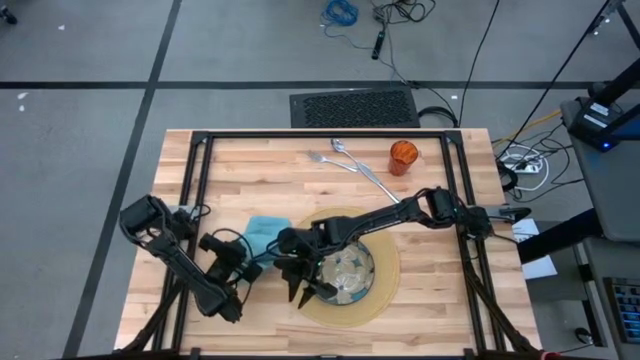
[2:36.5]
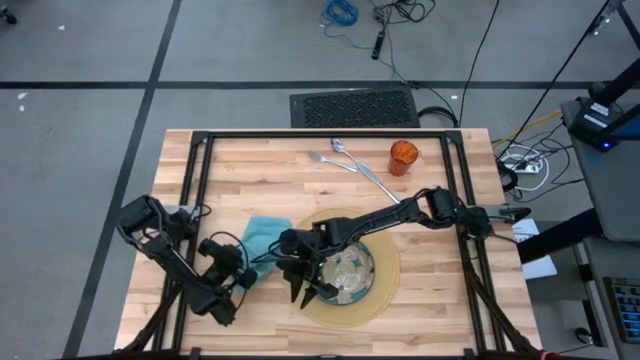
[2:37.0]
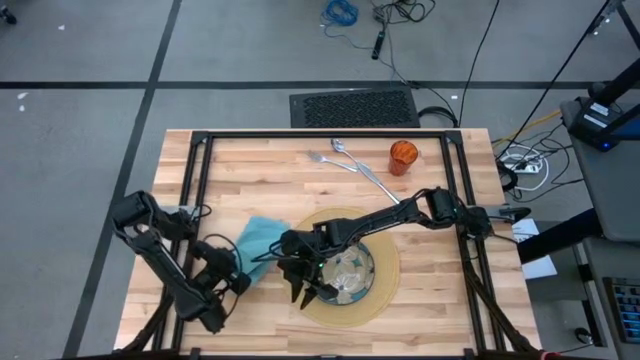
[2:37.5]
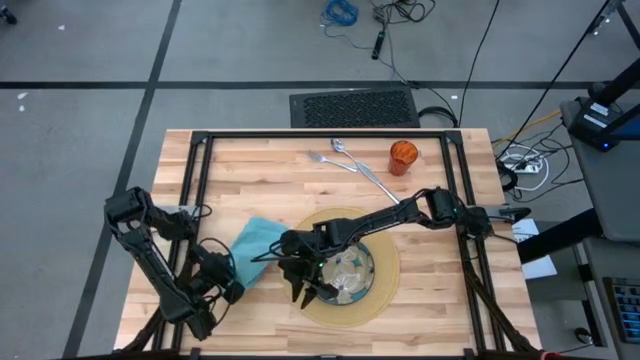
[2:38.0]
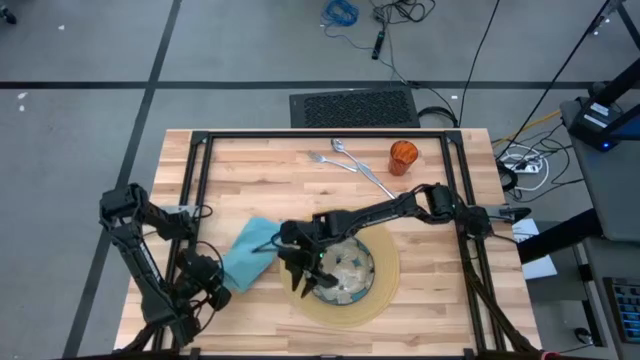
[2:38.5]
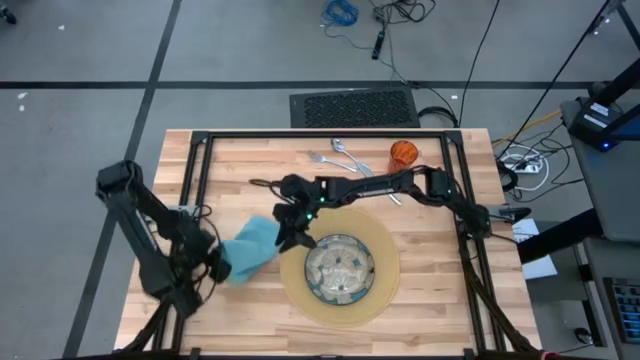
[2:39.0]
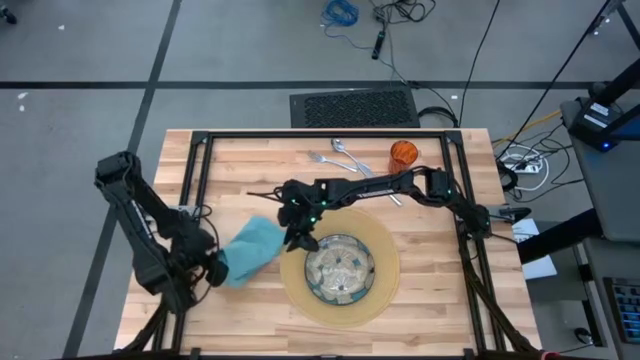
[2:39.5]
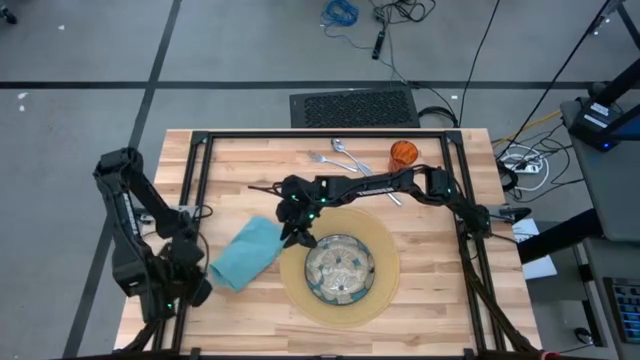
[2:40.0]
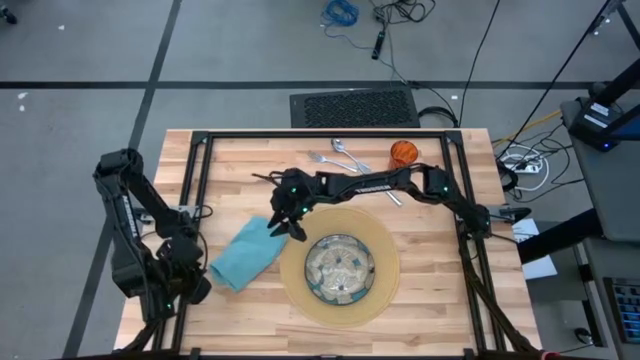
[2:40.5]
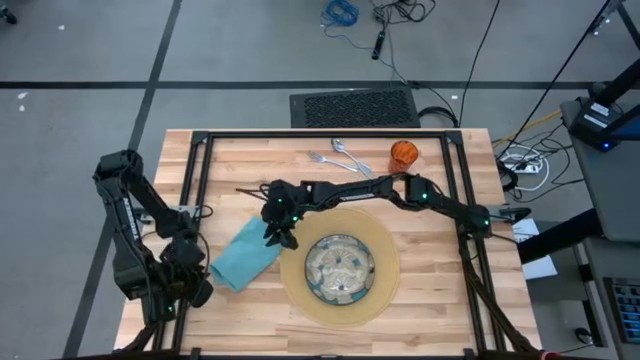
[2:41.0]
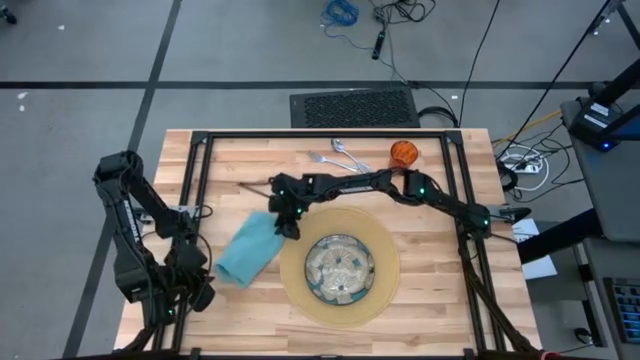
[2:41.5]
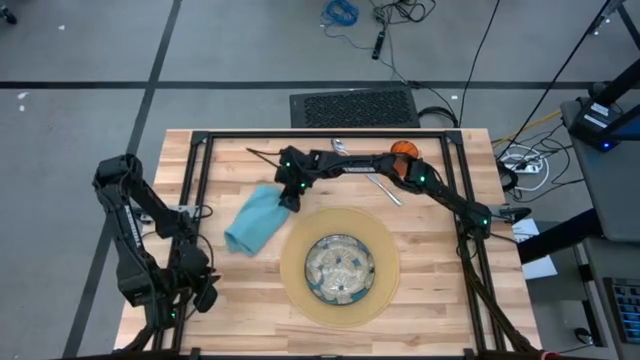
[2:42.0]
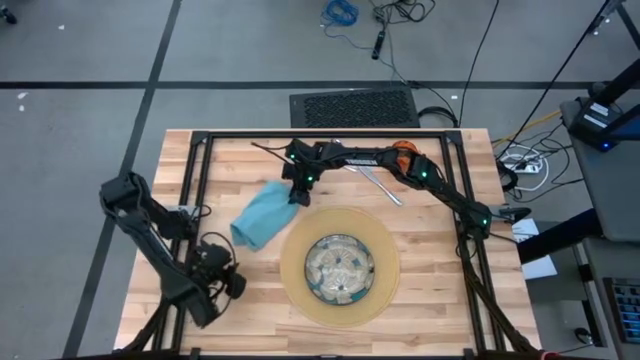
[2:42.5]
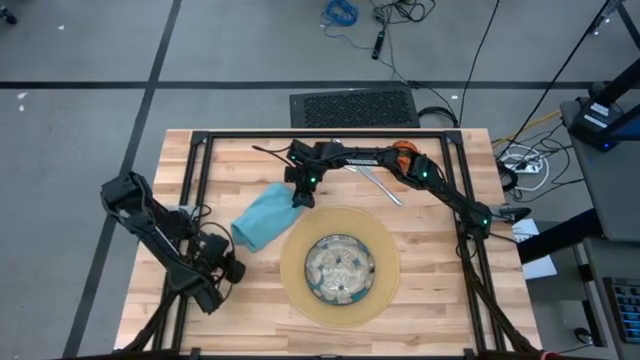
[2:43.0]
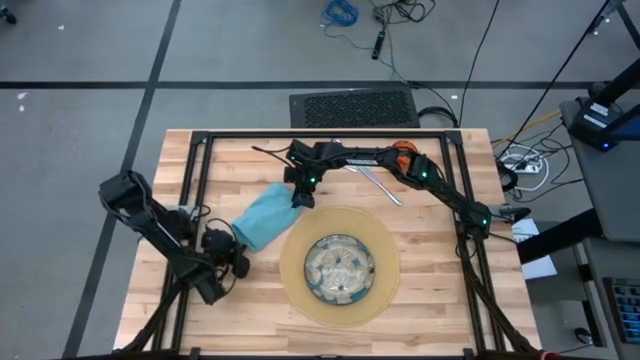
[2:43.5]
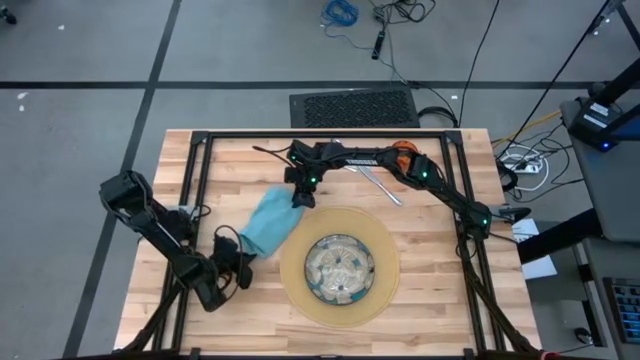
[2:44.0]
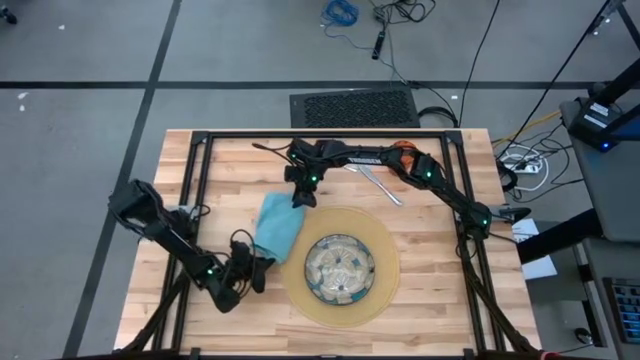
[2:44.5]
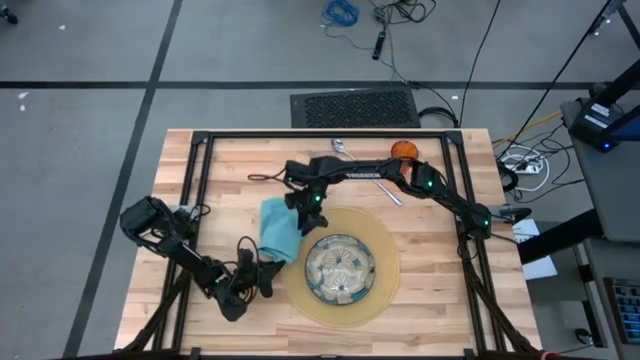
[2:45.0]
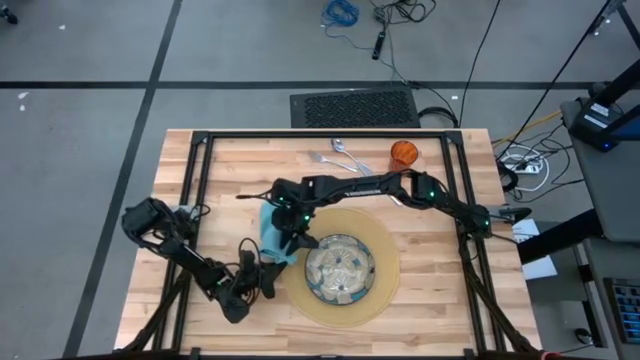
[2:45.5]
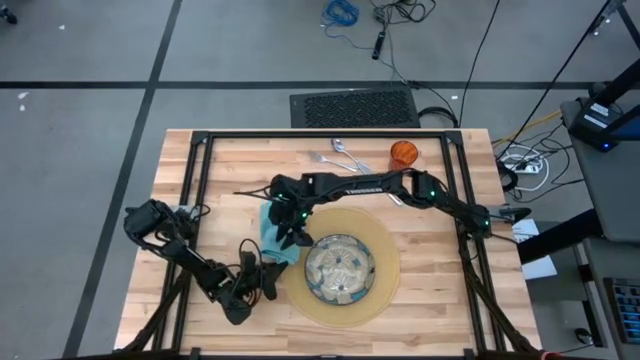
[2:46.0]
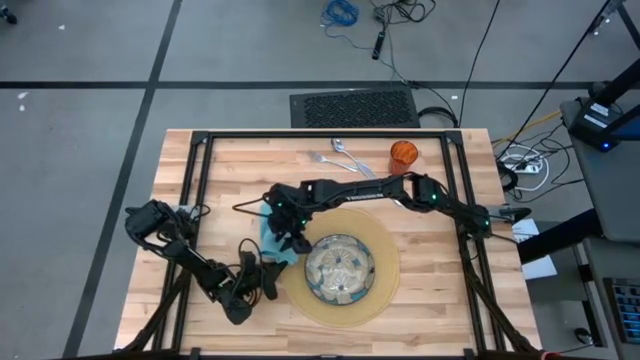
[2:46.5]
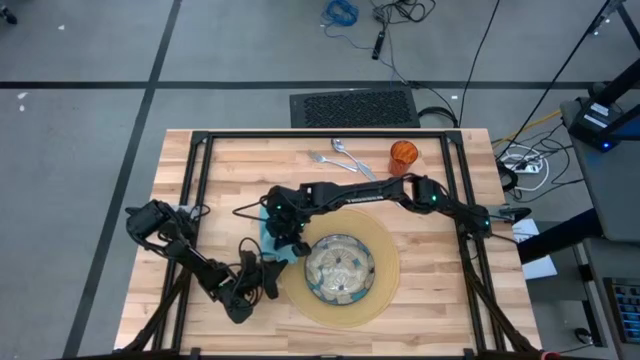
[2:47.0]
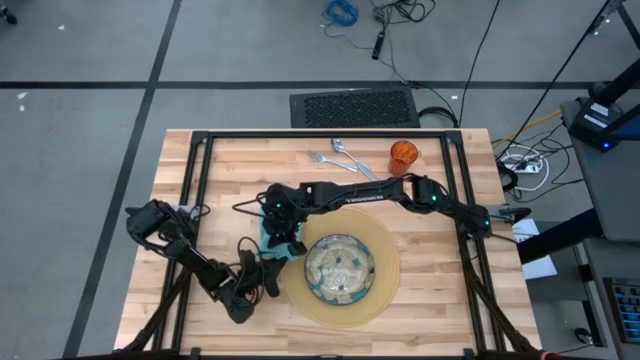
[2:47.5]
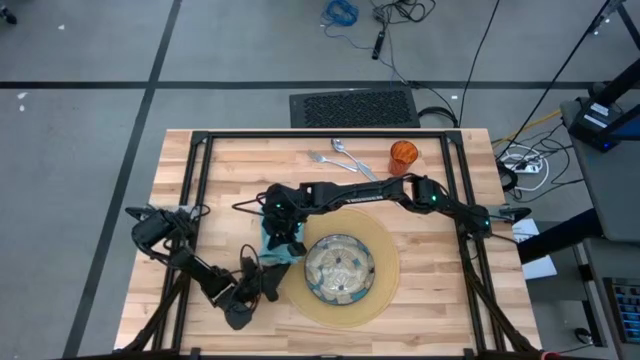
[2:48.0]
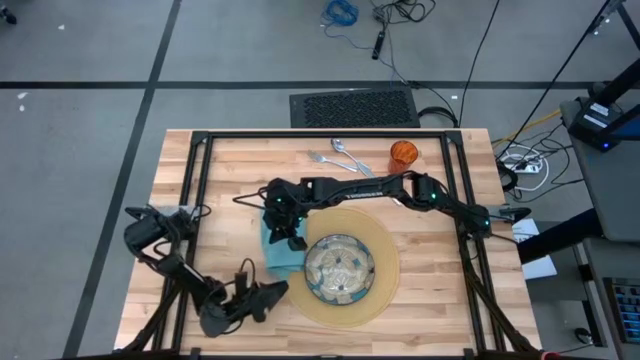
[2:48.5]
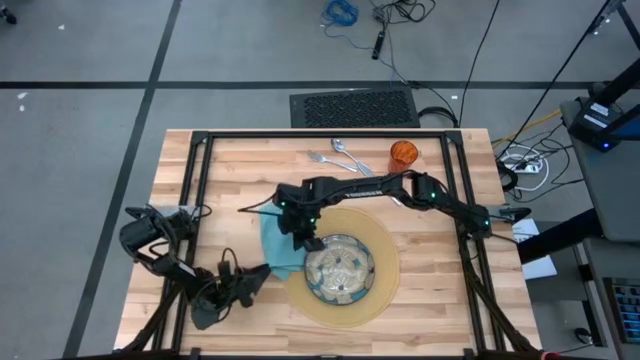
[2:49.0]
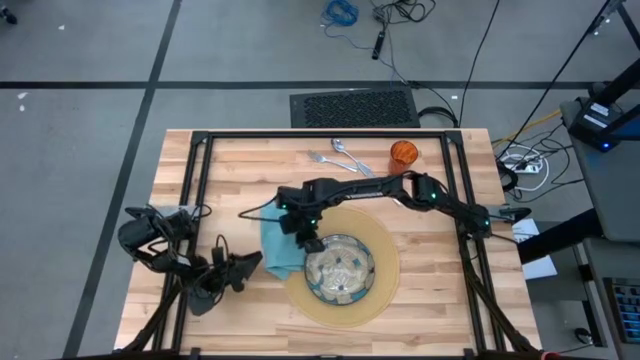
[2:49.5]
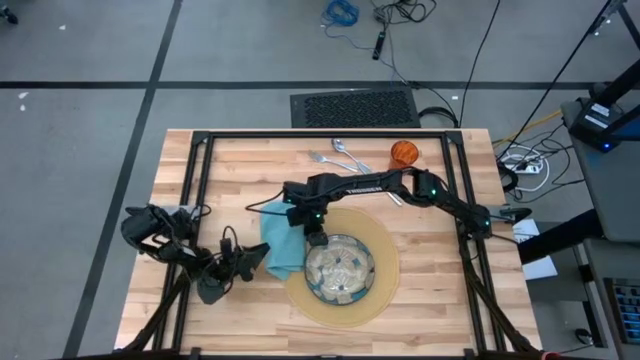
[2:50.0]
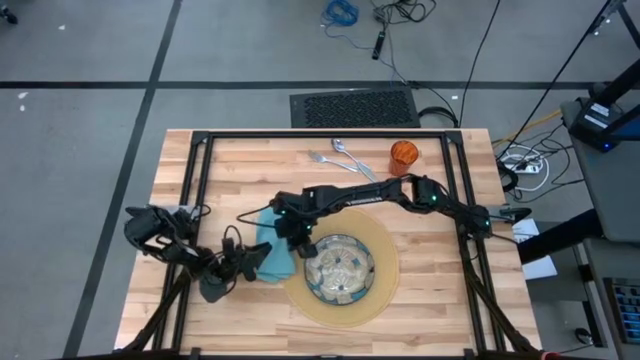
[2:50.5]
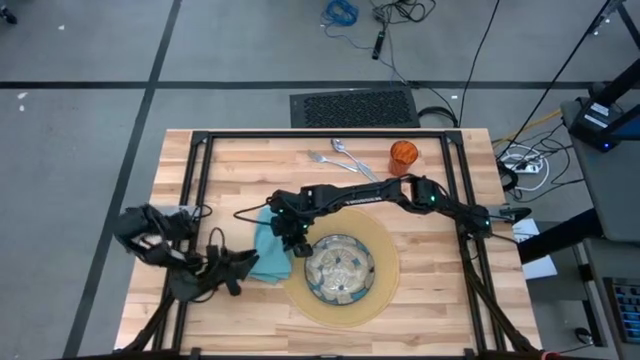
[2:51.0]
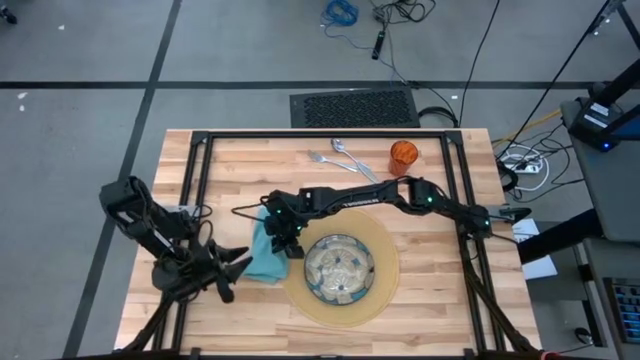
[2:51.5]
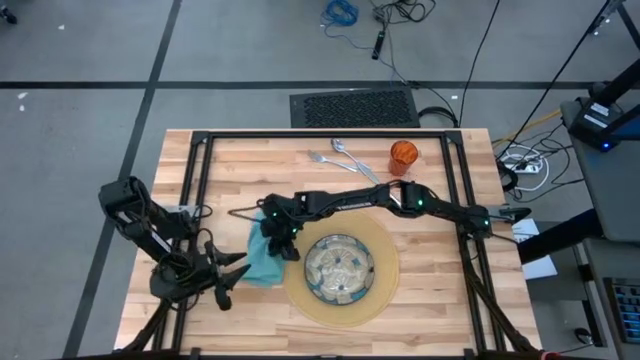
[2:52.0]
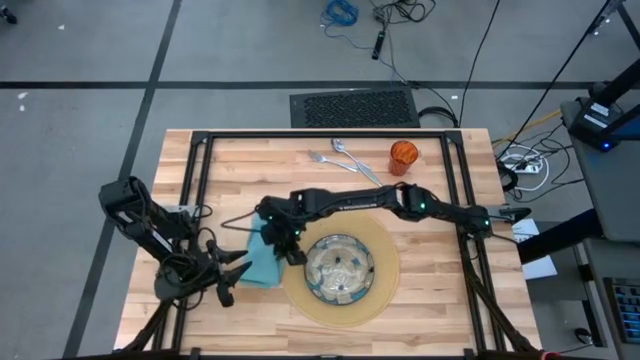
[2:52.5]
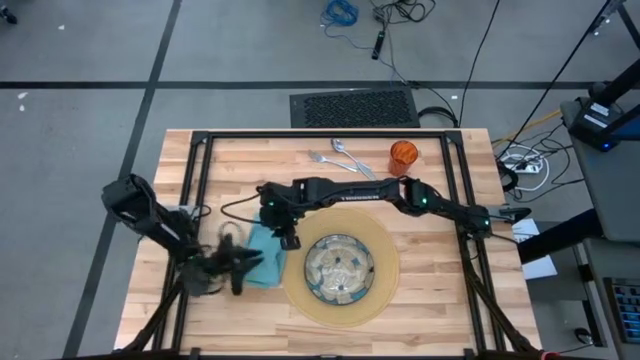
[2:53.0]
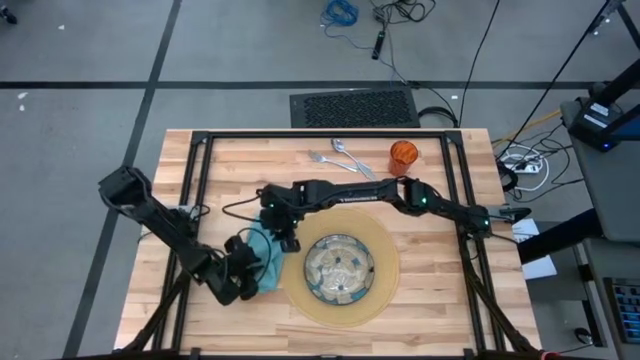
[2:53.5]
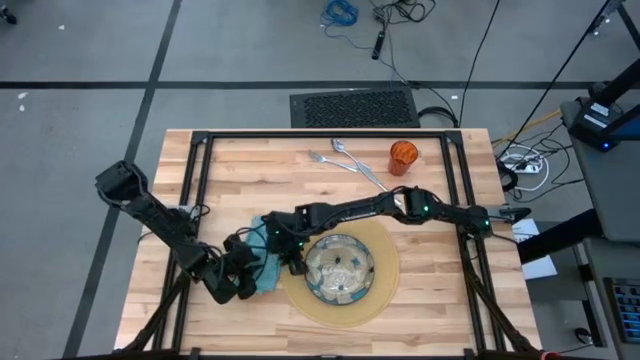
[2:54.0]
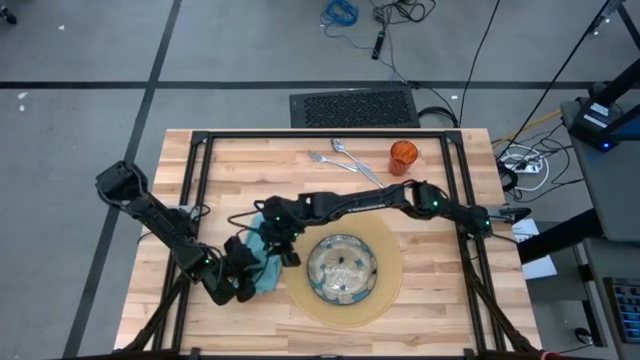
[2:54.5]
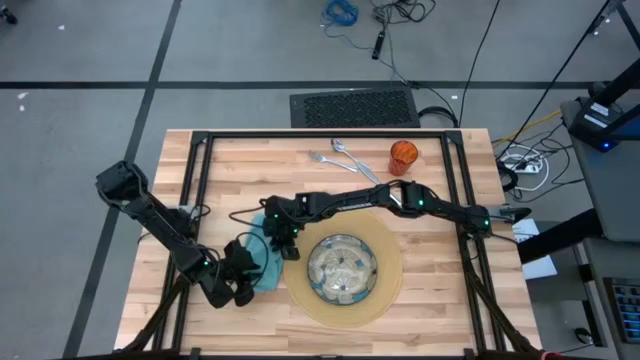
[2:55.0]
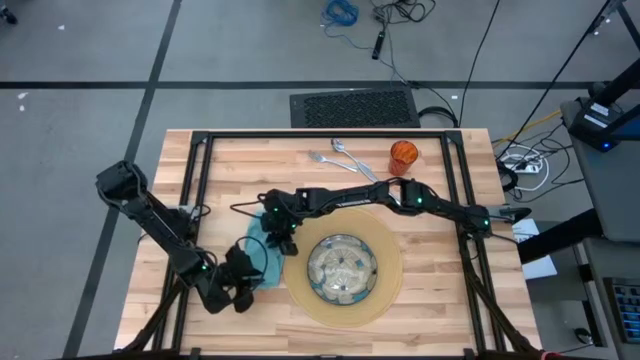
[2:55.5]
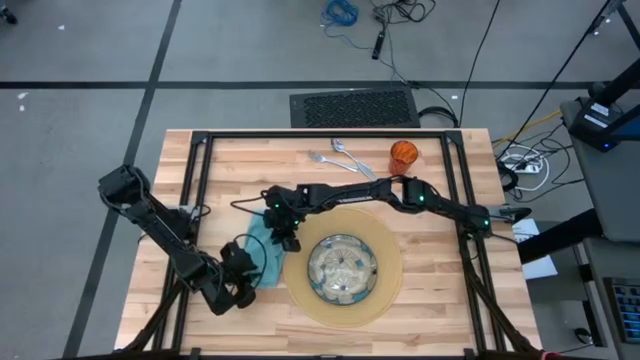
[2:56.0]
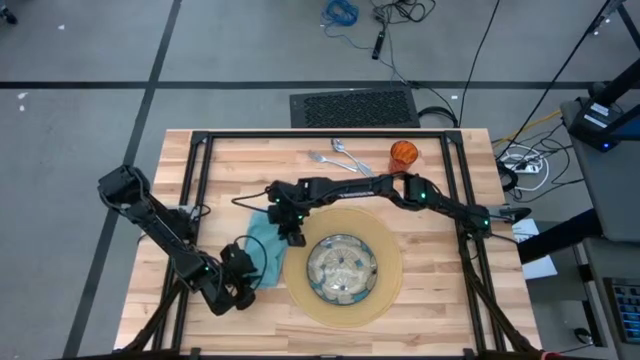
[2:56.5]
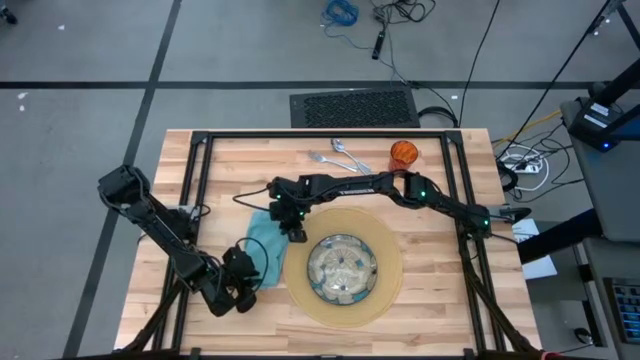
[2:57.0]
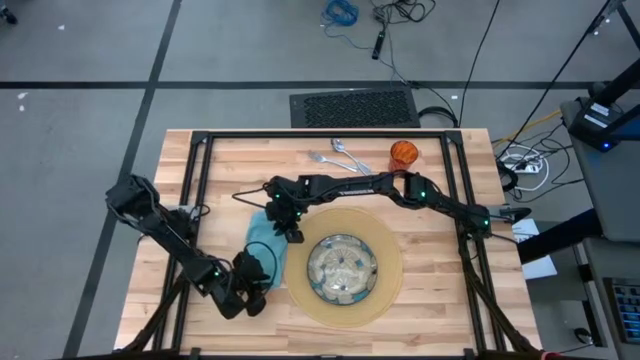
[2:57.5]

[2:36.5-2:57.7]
Task: Set table place
Put the blue napkin to the left of the brown mat
